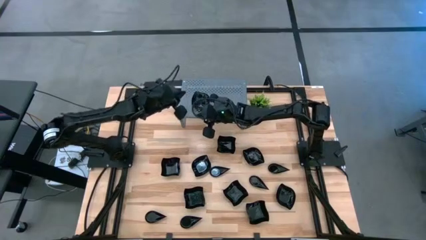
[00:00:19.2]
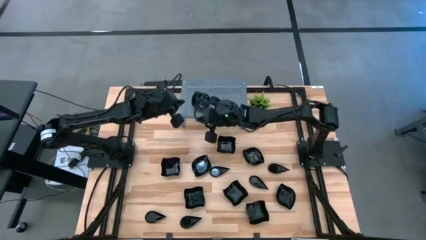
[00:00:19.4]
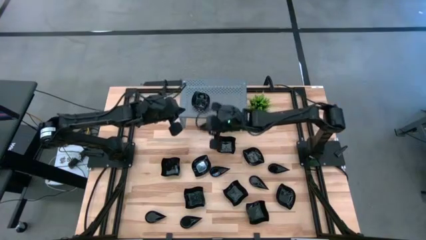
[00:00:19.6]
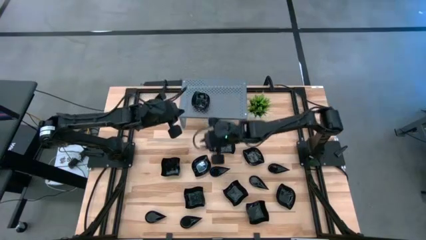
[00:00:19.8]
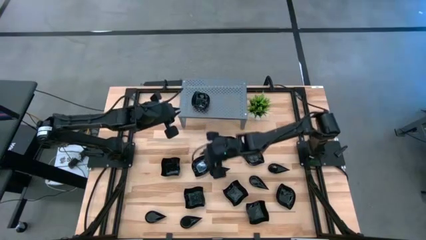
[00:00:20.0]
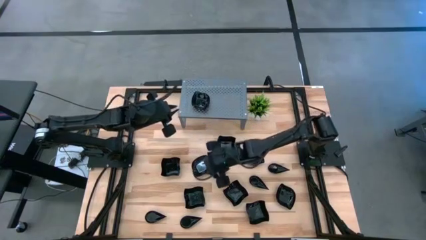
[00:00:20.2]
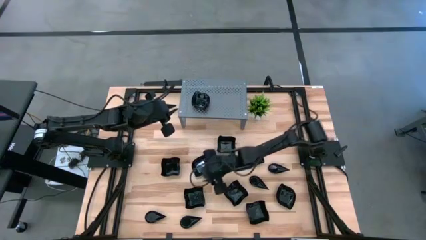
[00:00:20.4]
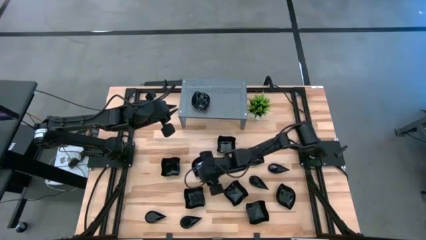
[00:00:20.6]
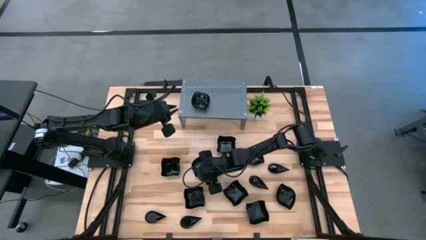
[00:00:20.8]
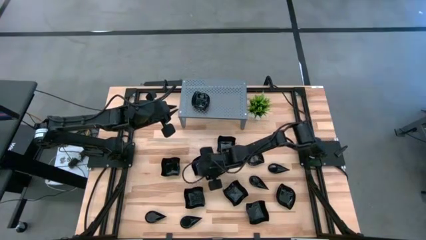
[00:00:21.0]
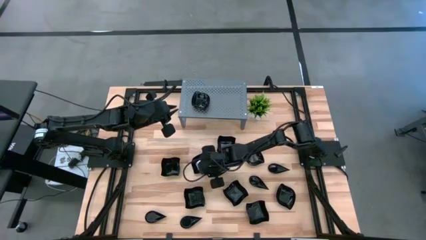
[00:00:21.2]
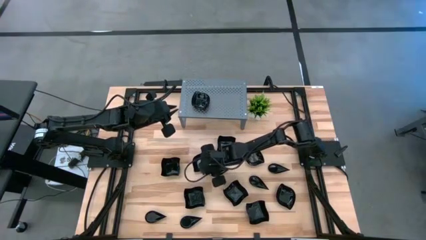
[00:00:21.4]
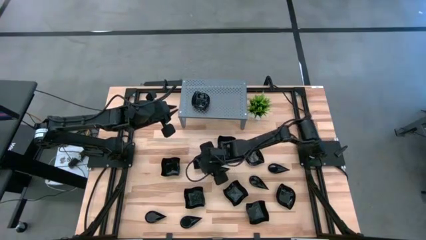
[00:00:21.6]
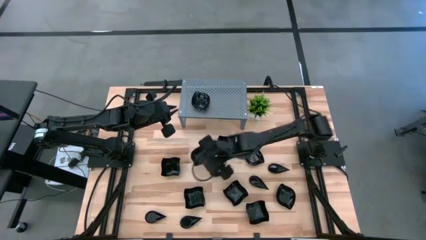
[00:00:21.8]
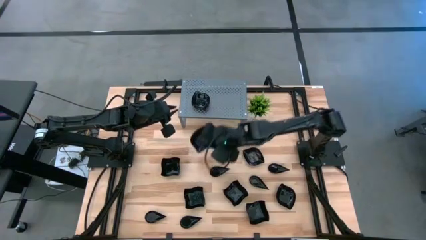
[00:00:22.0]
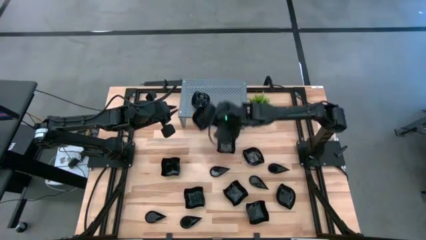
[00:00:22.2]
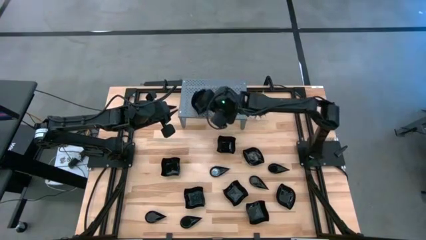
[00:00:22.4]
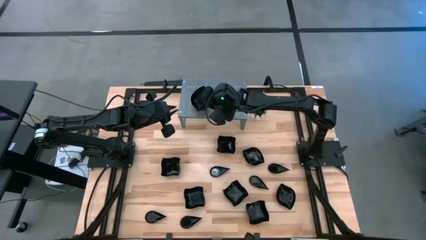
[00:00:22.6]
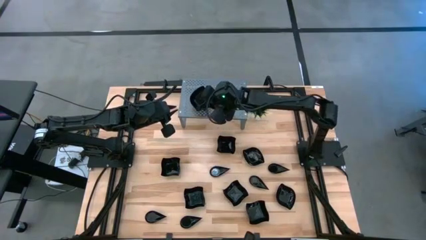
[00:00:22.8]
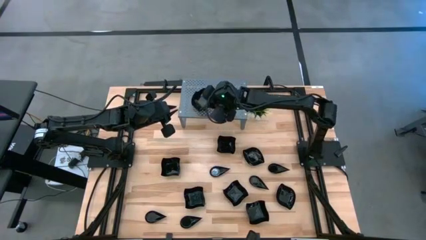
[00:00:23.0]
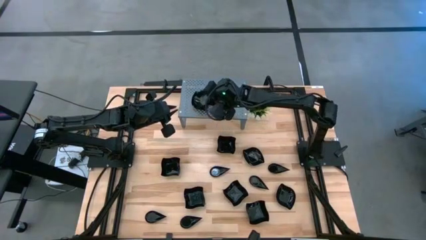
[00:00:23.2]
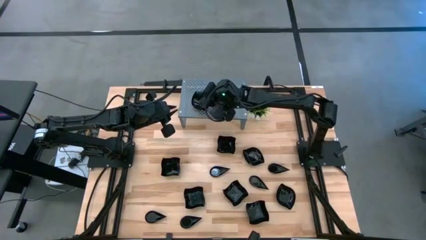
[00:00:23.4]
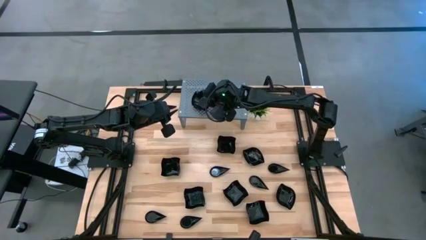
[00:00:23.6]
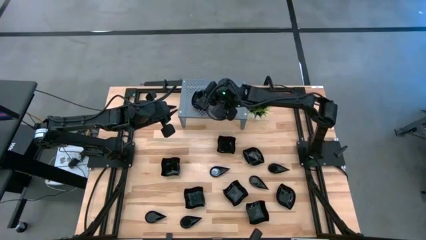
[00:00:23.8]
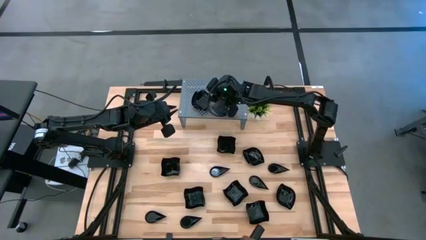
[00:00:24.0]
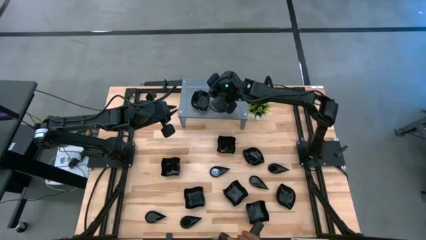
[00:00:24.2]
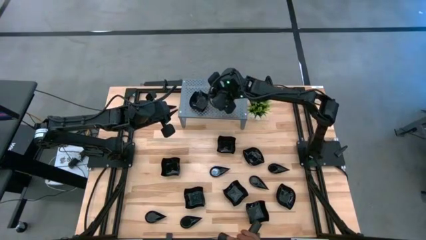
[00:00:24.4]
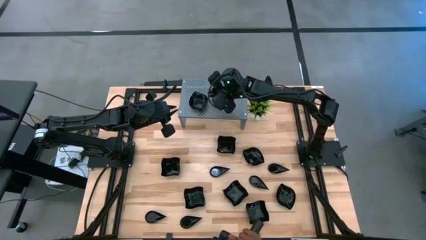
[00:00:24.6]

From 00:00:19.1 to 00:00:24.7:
Task: Pick & Place Mini shaped plates
Stack the black leaf-shaped plate on top of the stacked black leaf-shaped plates on the shelf

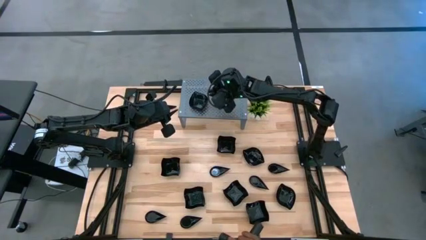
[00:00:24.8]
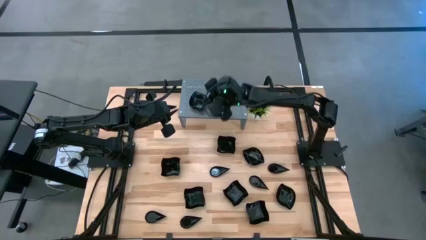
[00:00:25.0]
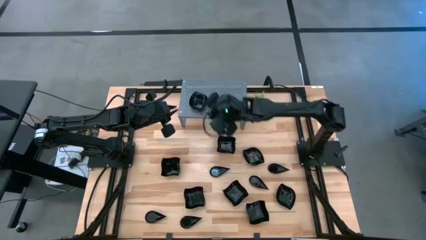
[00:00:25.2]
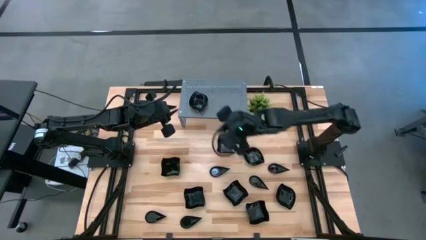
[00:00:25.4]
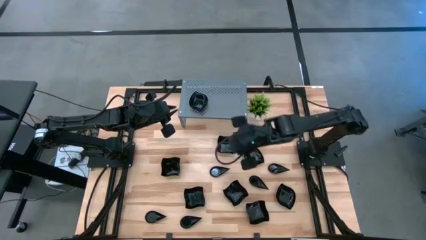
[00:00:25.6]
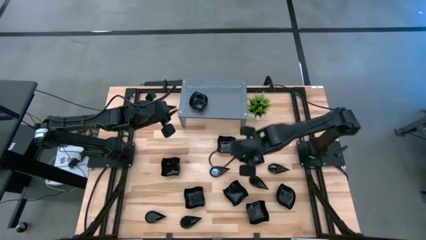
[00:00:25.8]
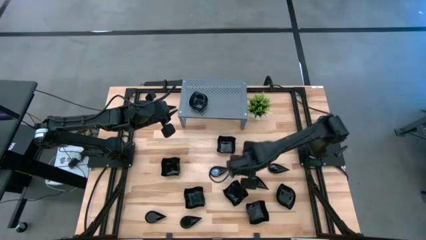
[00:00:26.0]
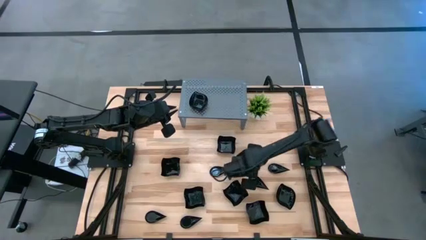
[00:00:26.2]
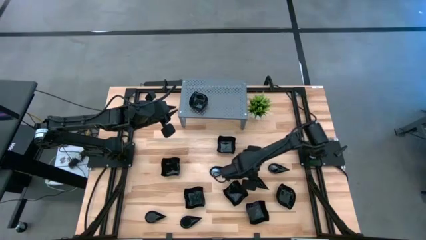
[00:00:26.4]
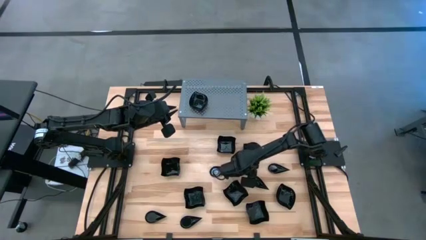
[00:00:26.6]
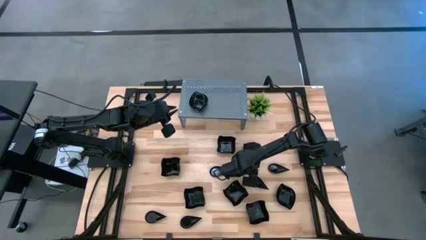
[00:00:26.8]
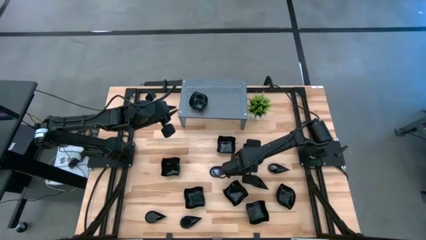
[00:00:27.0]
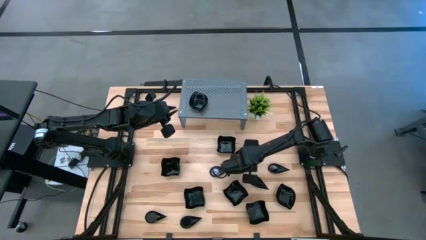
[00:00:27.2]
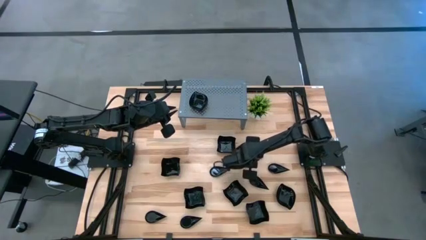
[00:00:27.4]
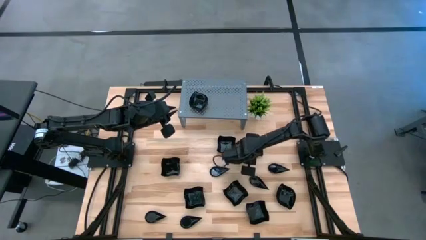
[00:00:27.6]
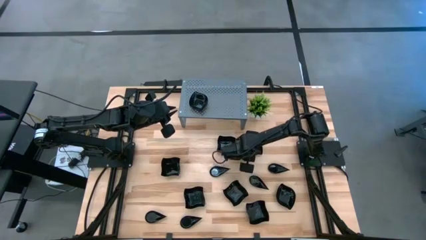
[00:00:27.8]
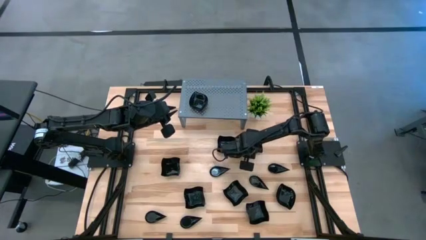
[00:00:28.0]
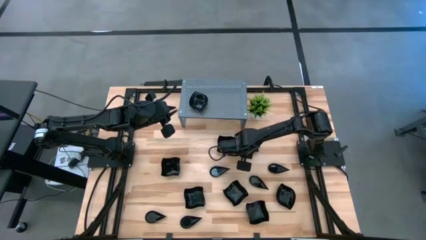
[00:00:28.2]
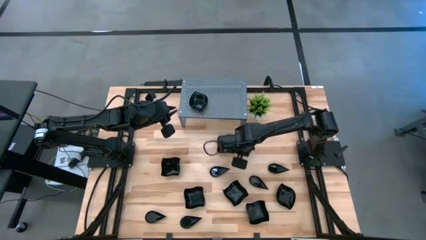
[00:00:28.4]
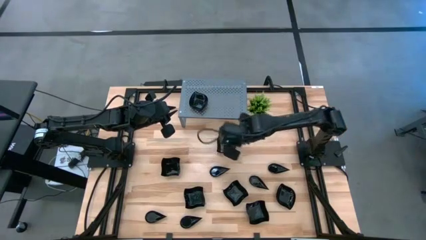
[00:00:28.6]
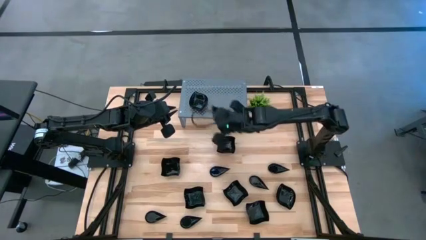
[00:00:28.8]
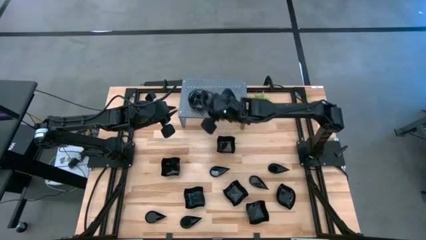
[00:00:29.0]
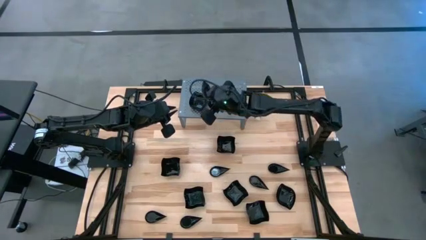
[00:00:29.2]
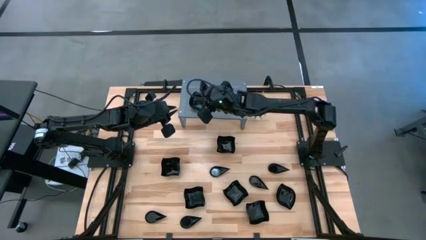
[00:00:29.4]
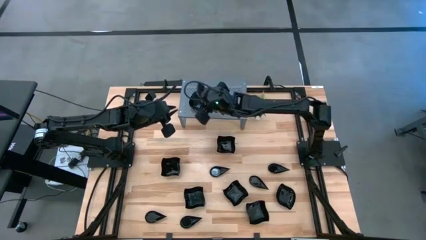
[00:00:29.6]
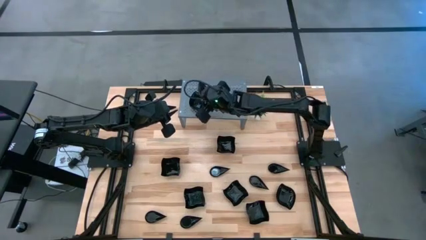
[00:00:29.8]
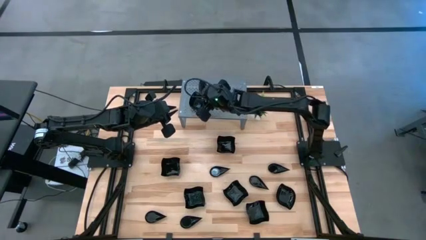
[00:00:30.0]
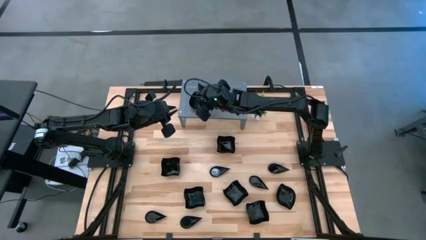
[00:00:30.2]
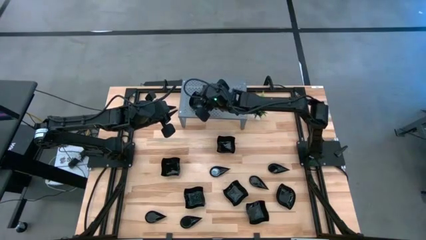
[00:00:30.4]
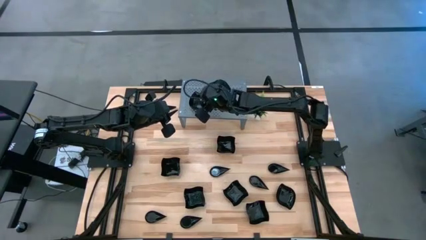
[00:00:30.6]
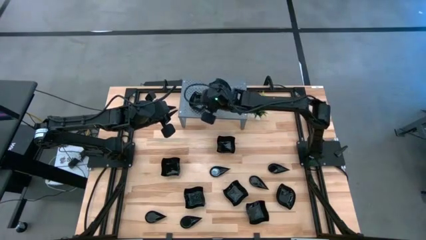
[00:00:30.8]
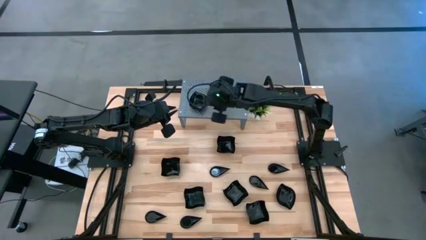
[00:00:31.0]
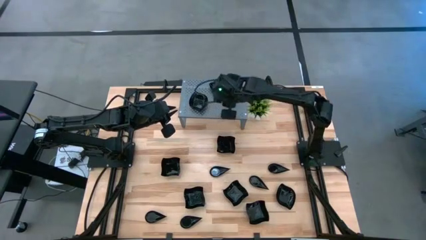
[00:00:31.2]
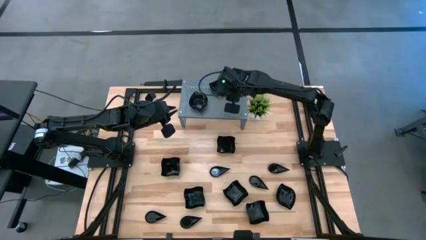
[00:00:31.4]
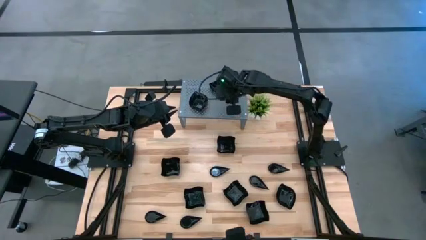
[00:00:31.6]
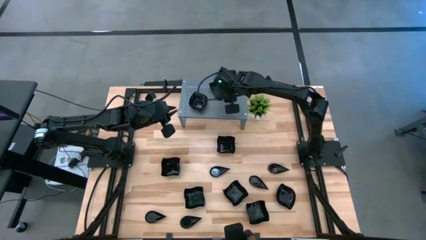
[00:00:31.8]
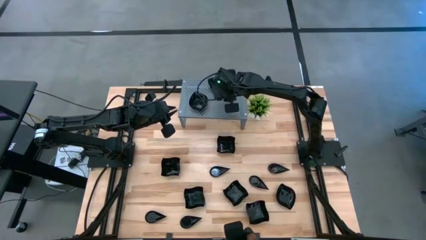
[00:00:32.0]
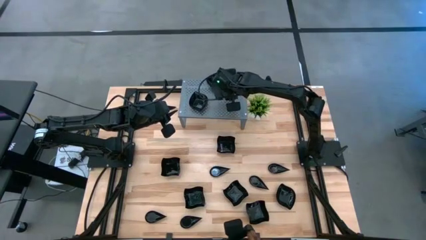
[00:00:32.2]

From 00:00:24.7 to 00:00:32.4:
Stack the black leaf-shaped plate on top of the stacked black leaf-shaped plates on the shelf

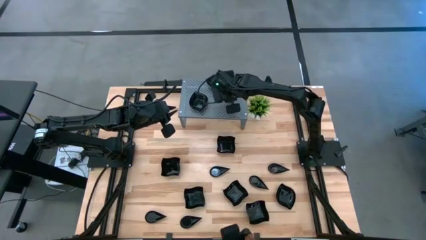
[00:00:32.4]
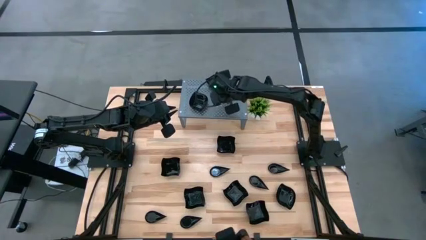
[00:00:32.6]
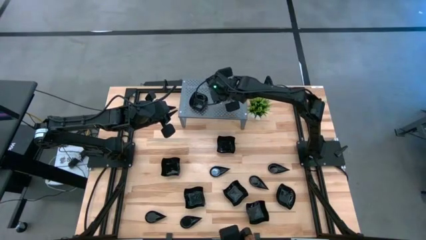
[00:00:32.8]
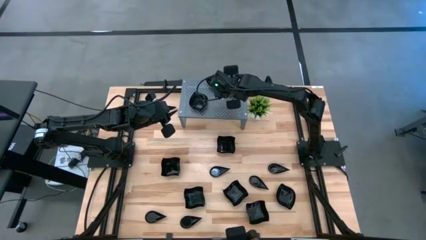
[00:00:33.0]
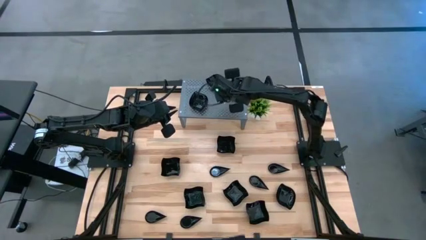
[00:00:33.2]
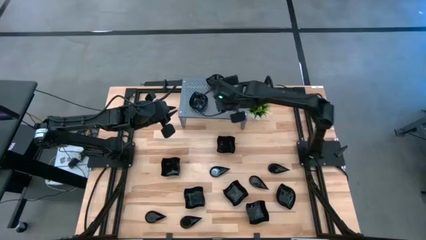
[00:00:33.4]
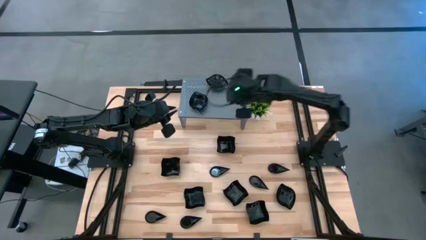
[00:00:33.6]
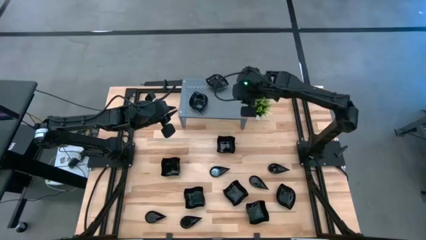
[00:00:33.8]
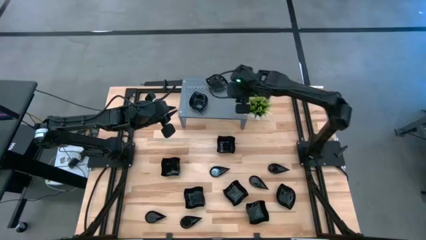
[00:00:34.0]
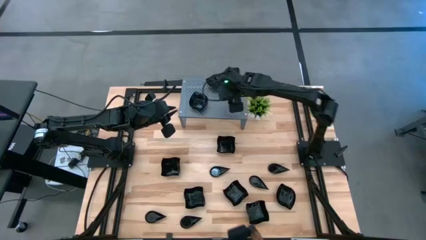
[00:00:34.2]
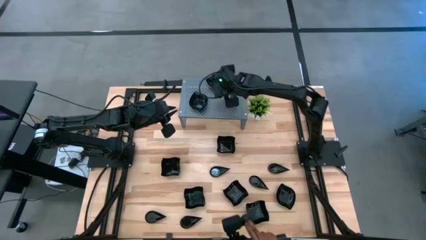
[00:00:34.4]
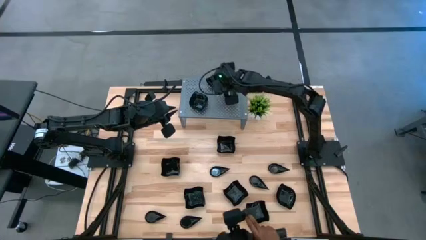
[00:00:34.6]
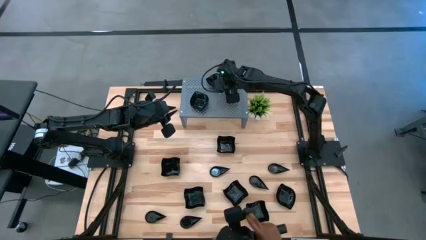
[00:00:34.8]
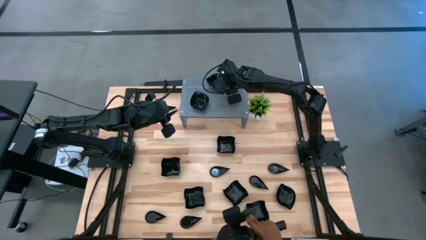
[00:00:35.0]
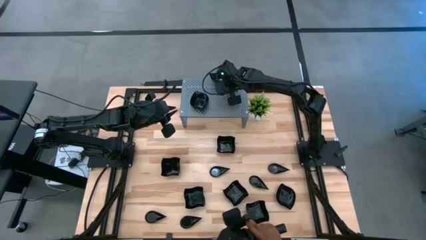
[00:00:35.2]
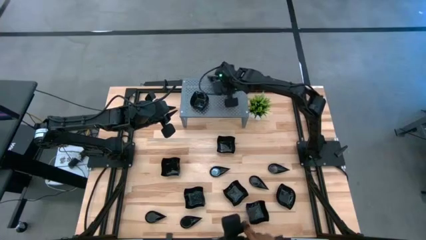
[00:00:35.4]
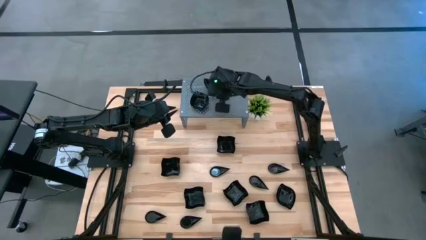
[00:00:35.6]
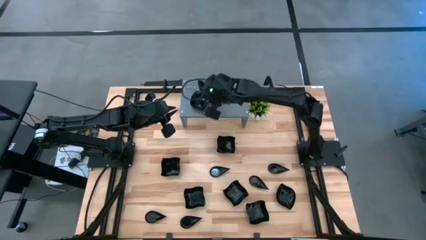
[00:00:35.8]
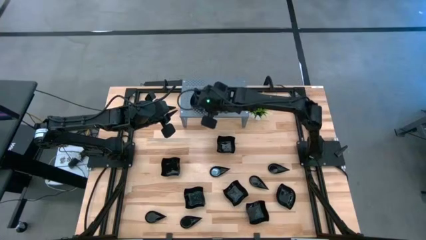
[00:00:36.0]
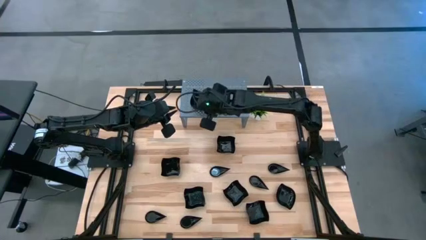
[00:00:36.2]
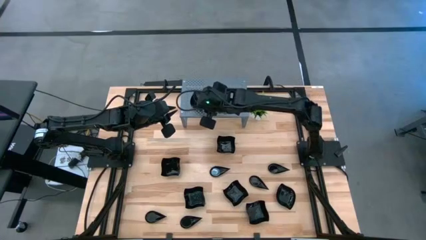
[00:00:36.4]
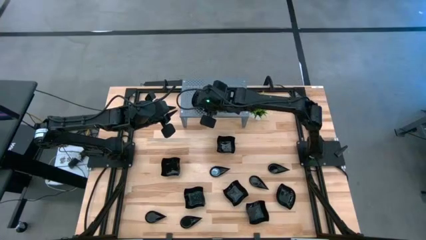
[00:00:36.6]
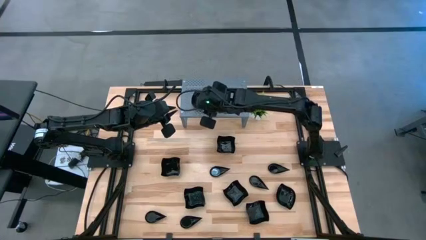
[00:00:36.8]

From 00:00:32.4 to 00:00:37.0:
Stack the black leaf-shaped plate on top of the stacked black leaf-shaped plates on the shelf
